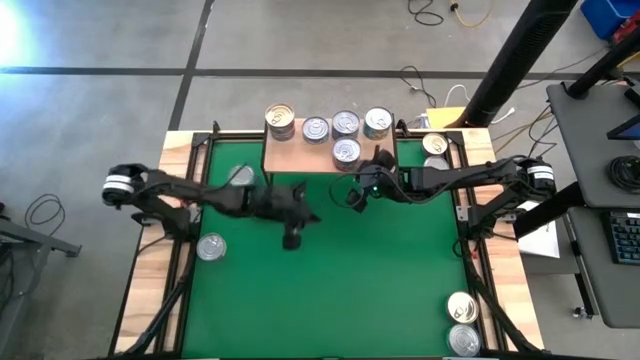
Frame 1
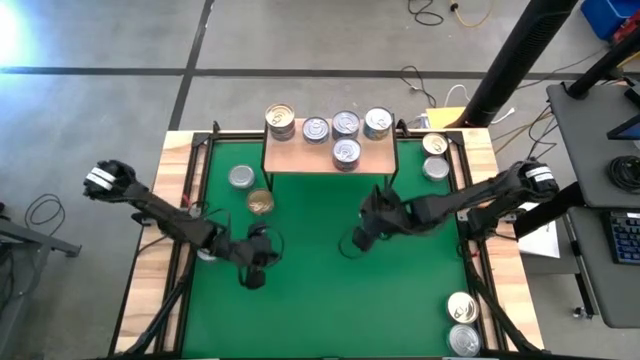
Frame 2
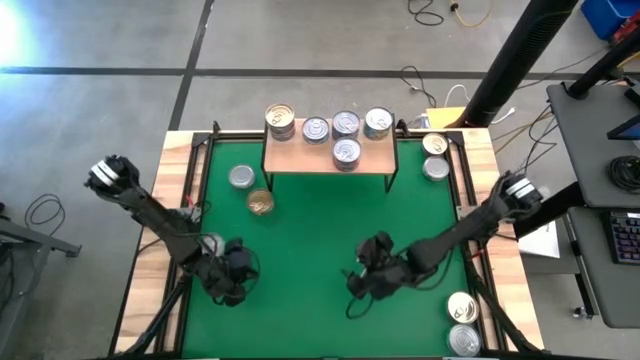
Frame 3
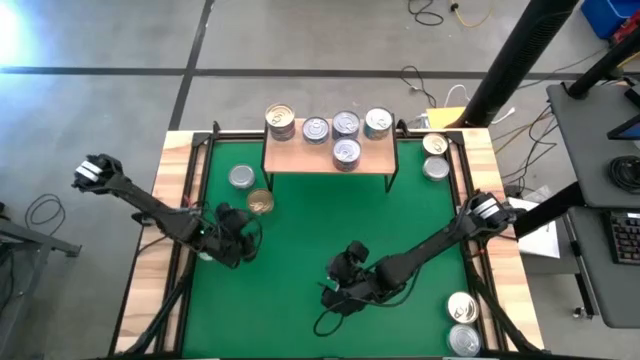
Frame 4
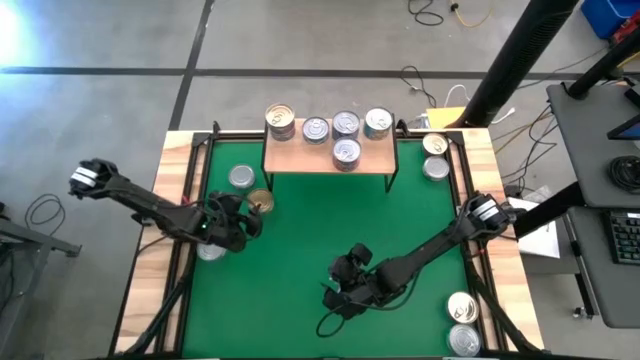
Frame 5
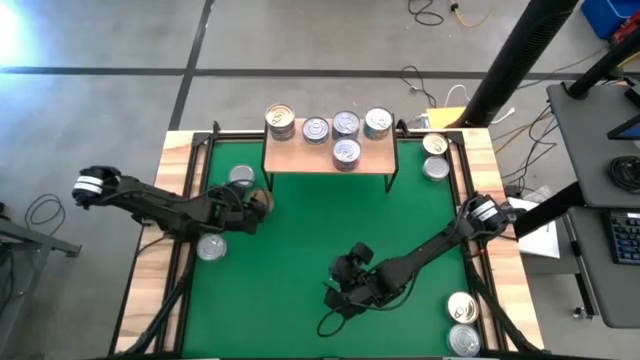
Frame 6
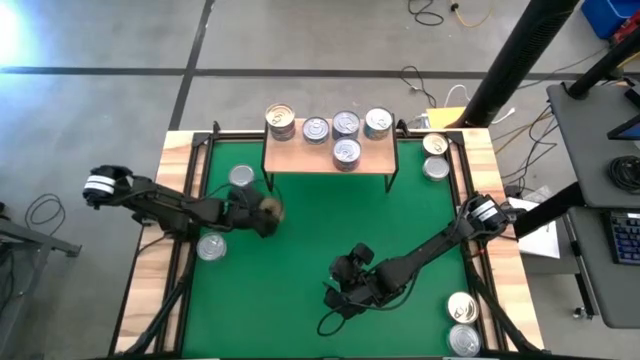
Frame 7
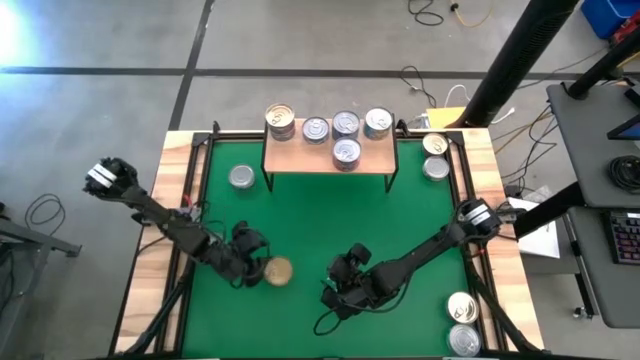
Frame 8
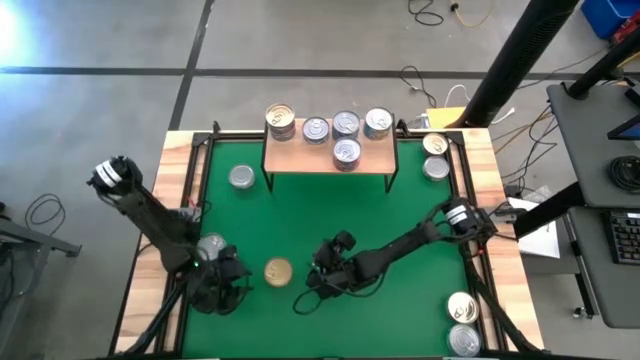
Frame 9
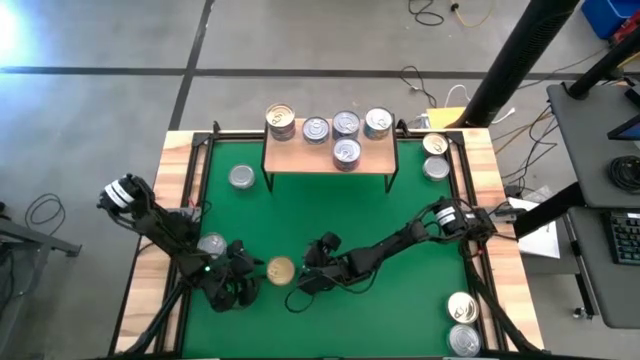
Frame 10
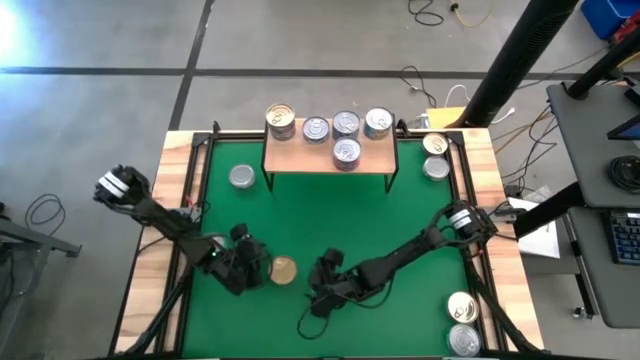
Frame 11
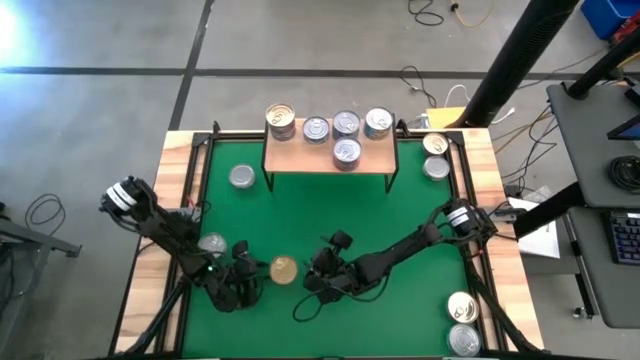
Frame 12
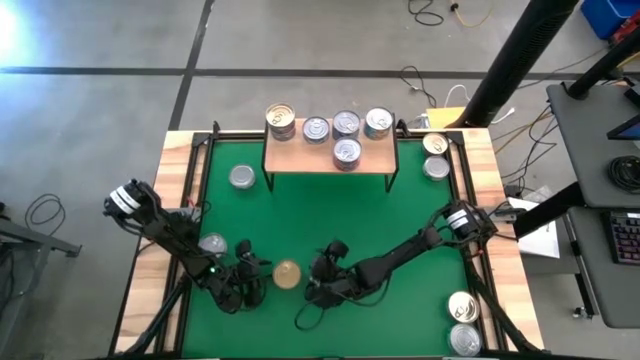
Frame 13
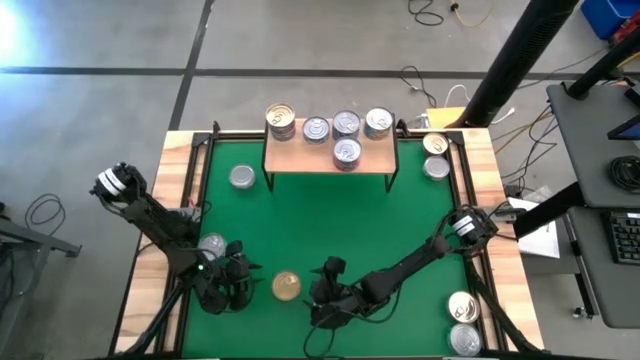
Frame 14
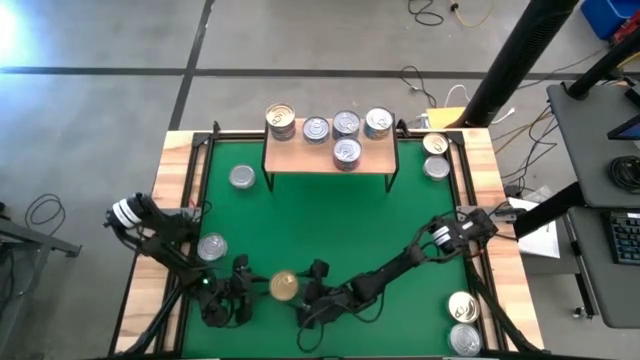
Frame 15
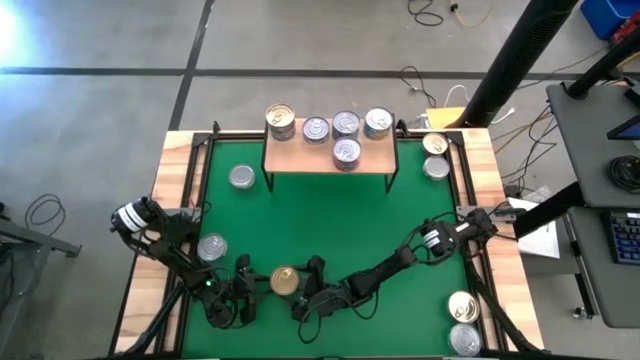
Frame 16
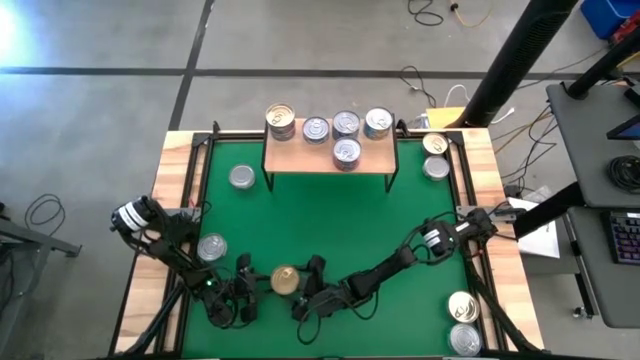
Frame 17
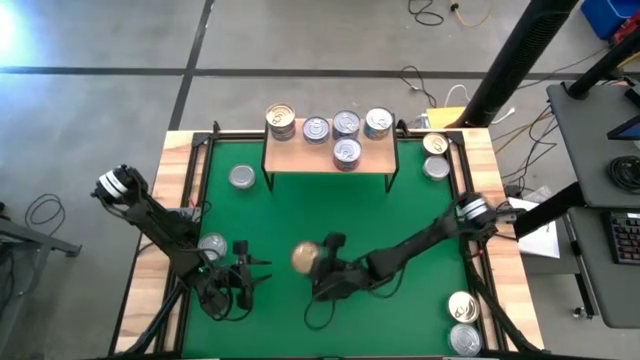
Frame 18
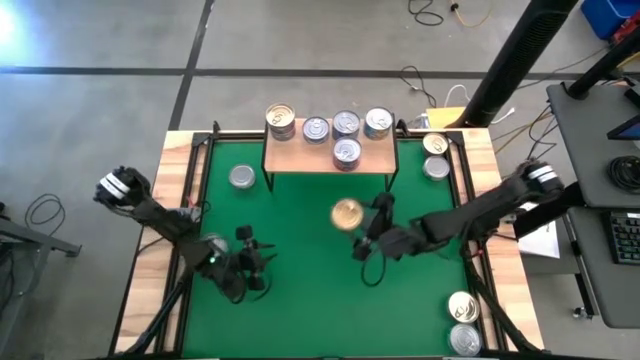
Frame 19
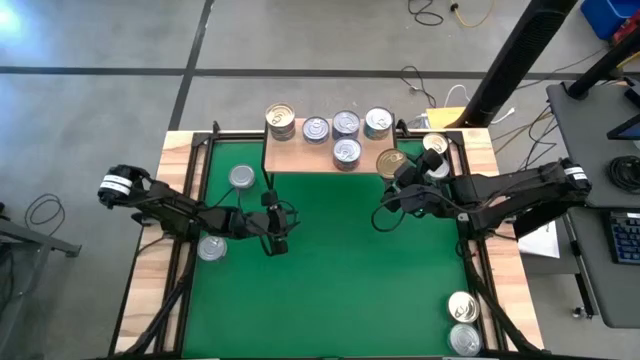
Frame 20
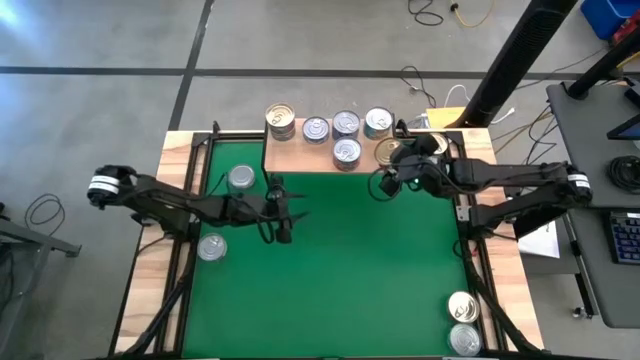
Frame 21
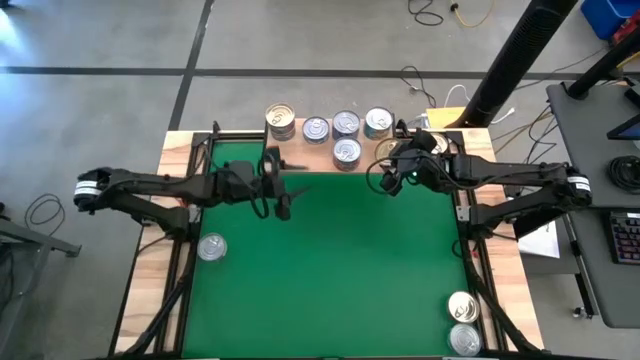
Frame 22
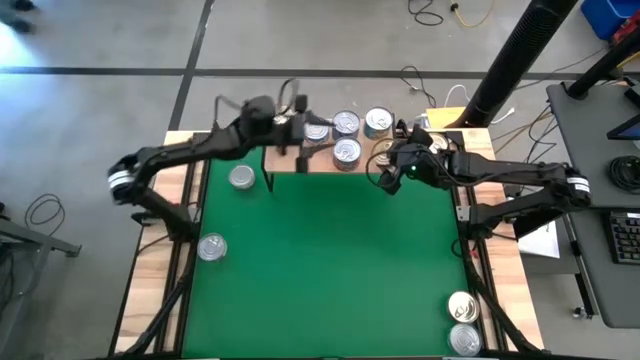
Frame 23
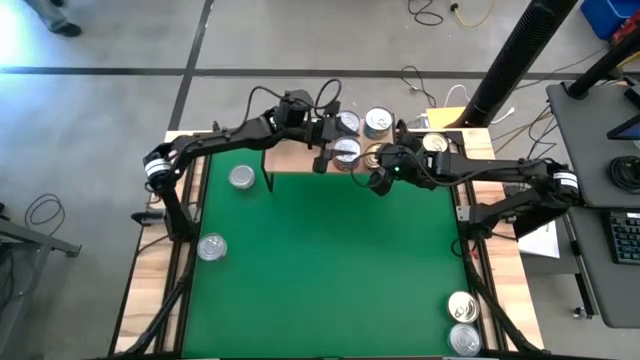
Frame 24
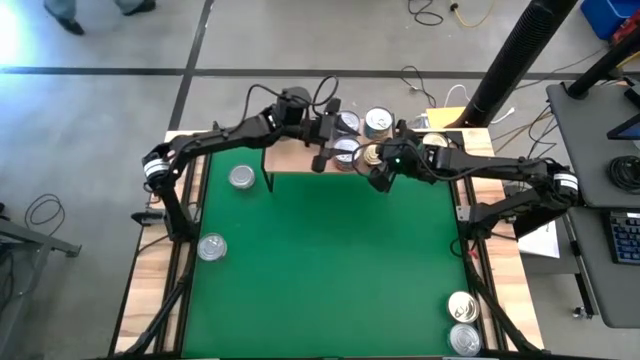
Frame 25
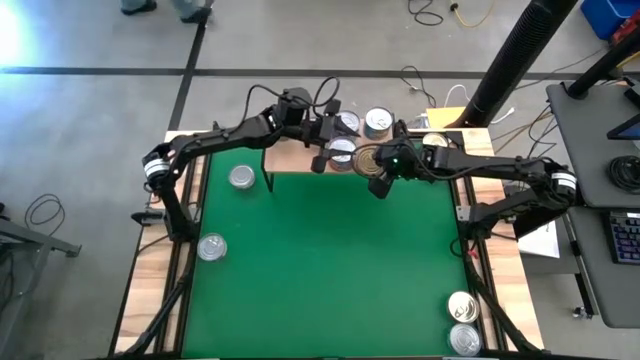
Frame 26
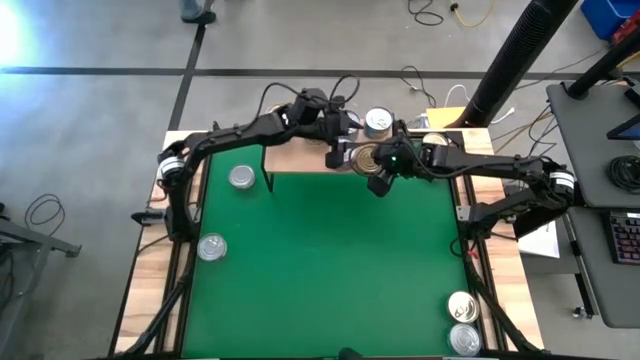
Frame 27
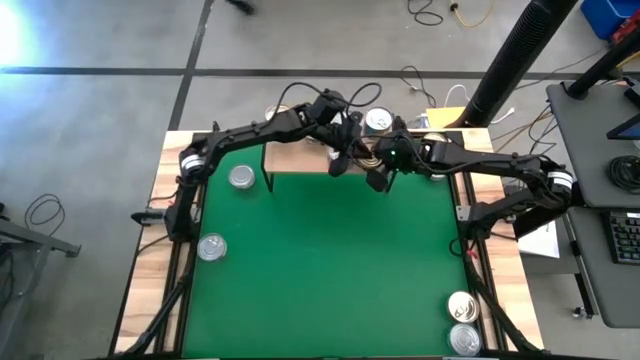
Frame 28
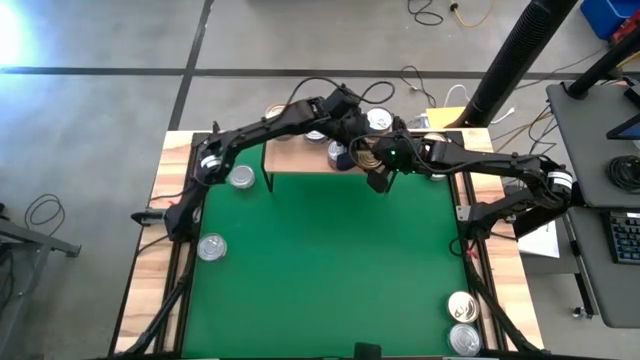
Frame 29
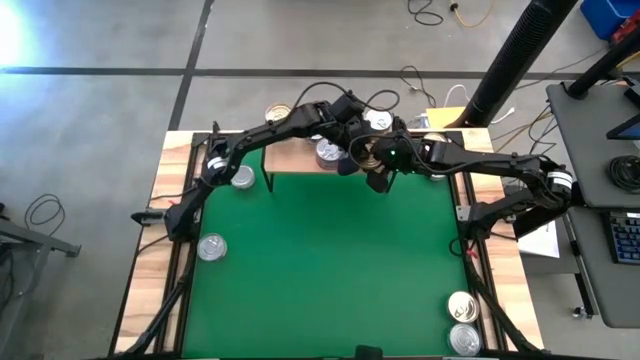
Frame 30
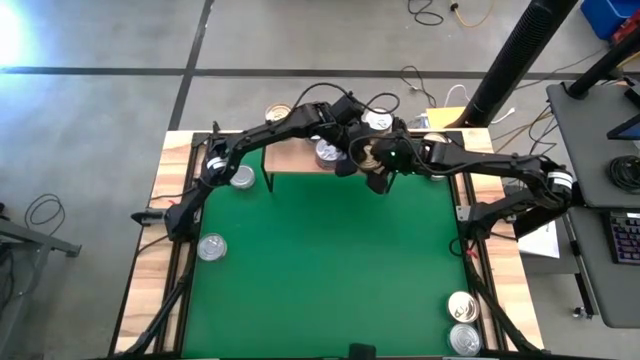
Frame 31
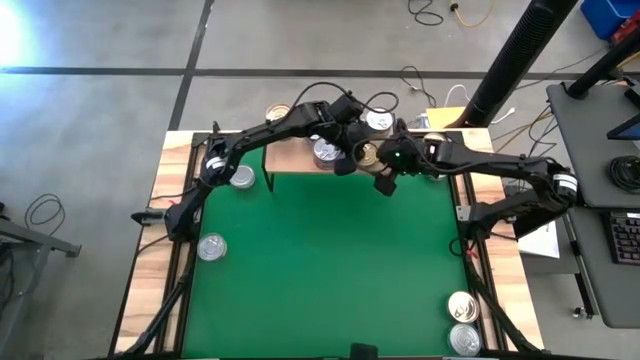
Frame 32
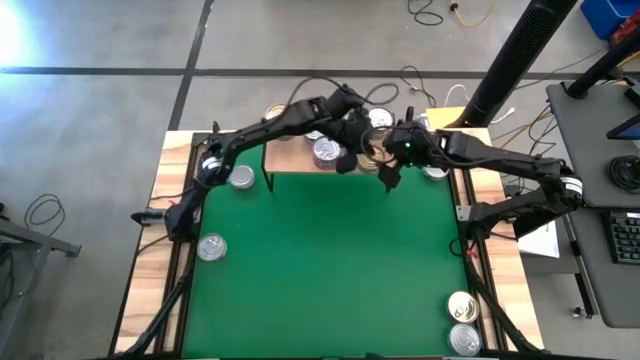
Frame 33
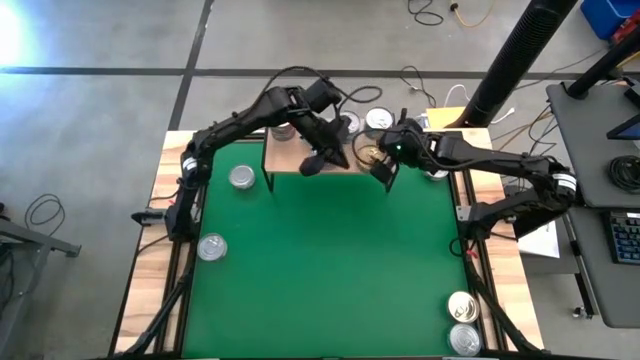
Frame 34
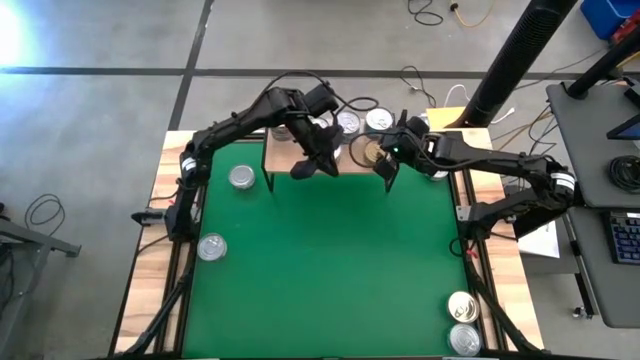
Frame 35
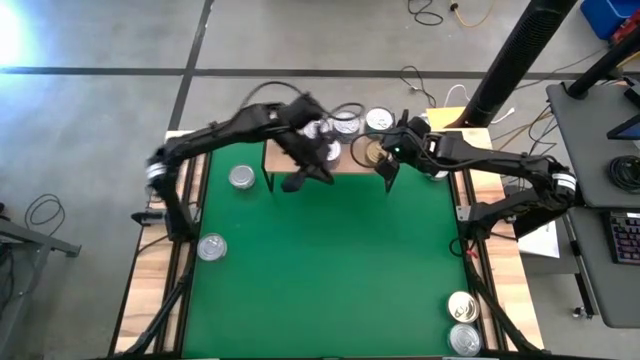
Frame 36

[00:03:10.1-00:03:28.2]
Task: Stack canned seafood by type on shelf
Put the green tuna can on the shelf

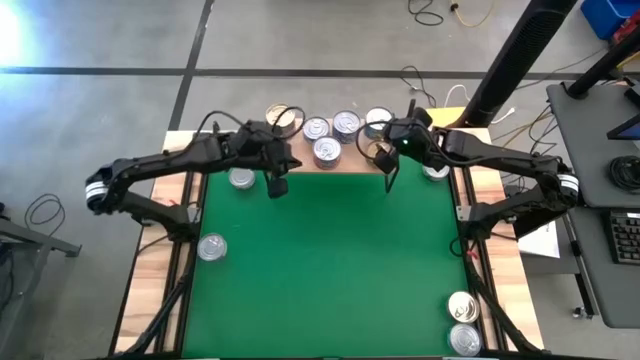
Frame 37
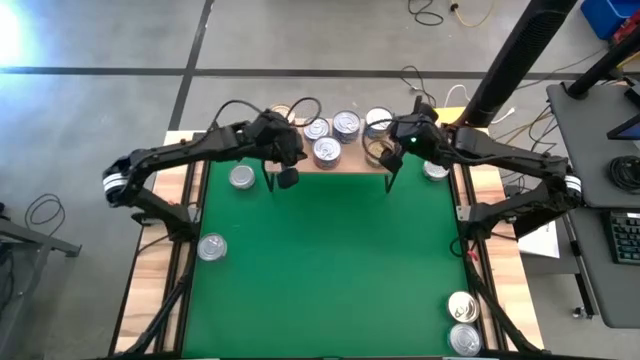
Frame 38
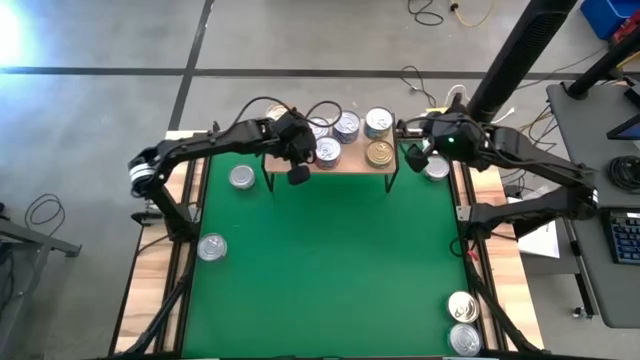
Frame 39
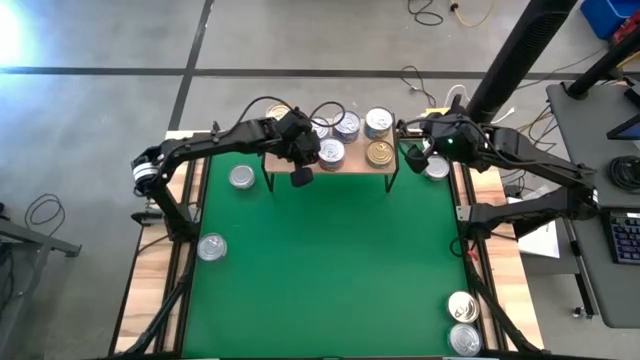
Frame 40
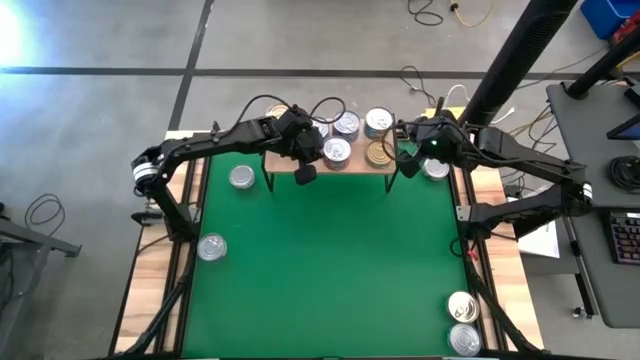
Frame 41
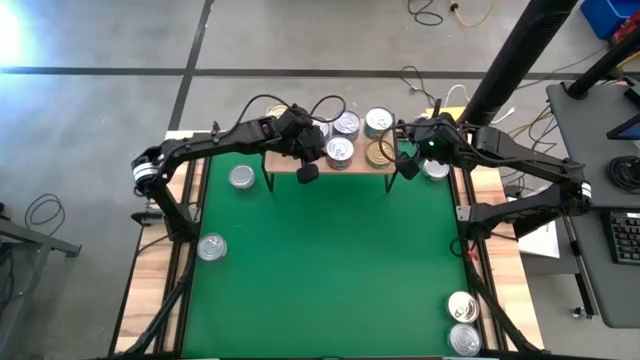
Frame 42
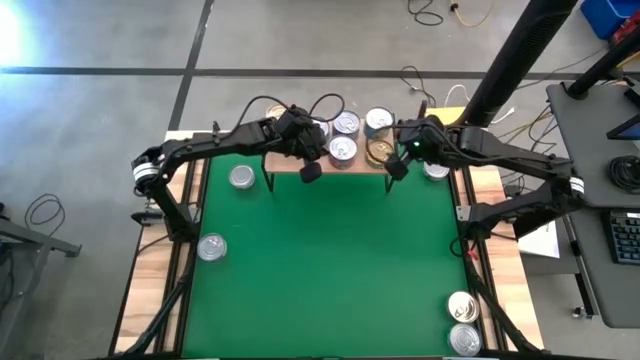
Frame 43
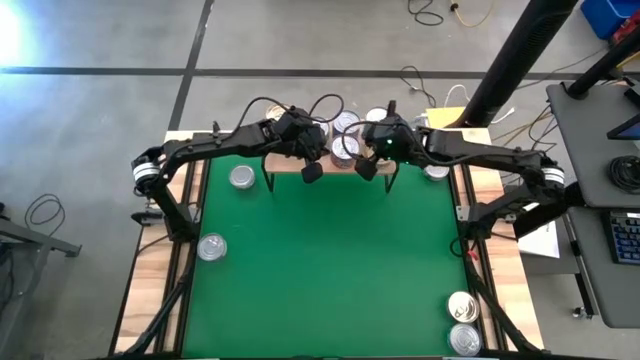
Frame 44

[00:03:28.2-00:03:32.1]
Adjust the red tuna cans on the shelf
